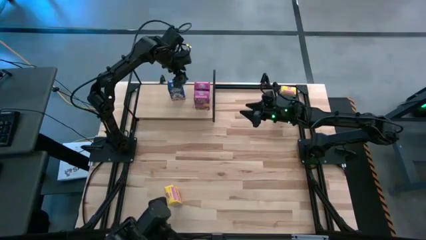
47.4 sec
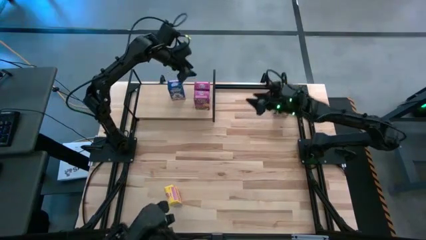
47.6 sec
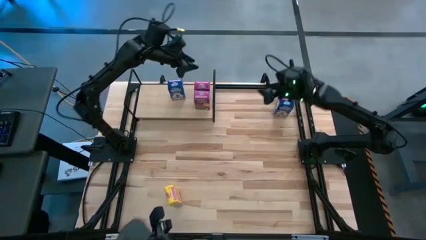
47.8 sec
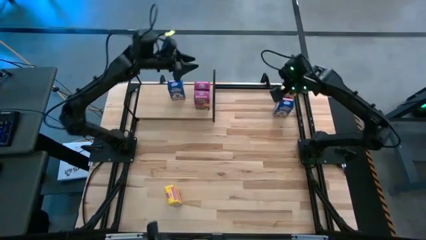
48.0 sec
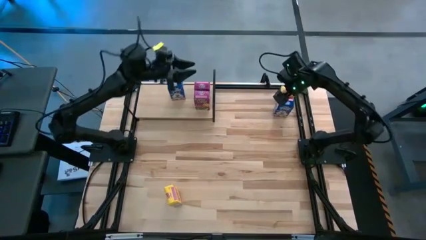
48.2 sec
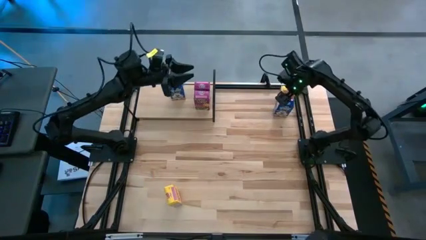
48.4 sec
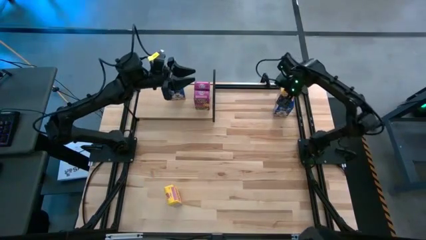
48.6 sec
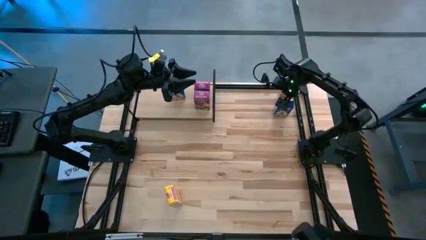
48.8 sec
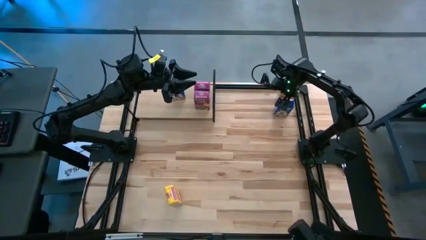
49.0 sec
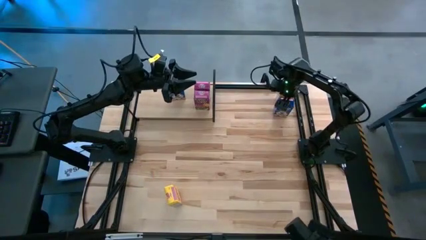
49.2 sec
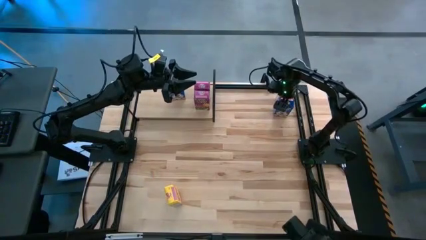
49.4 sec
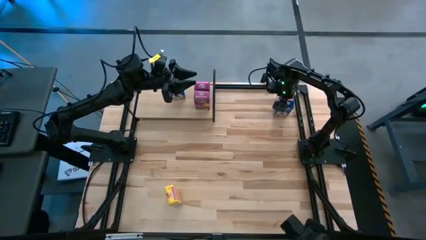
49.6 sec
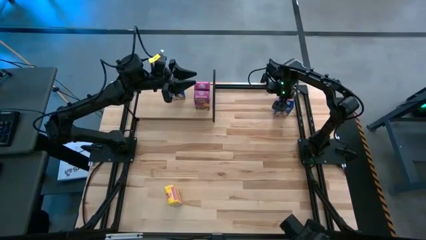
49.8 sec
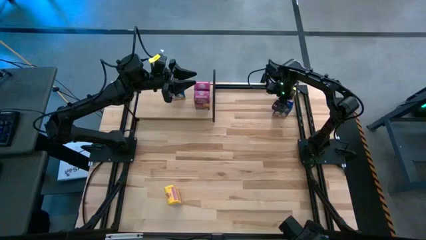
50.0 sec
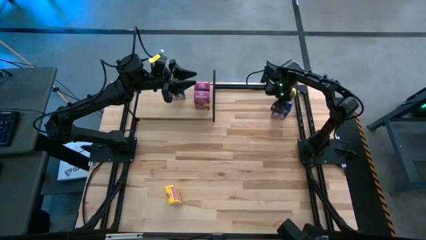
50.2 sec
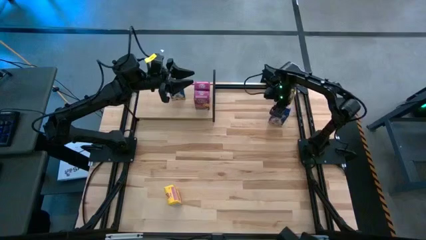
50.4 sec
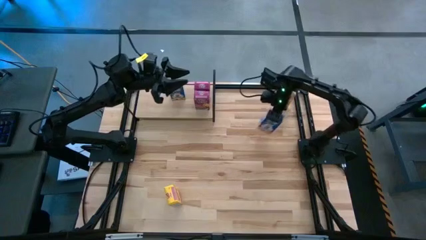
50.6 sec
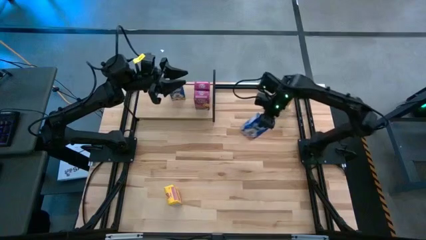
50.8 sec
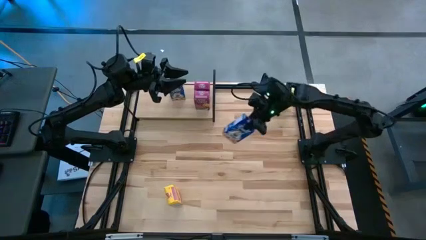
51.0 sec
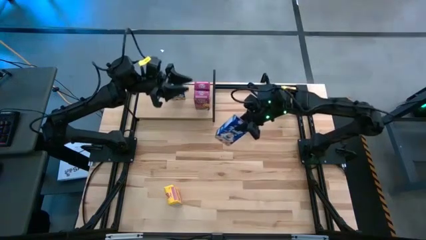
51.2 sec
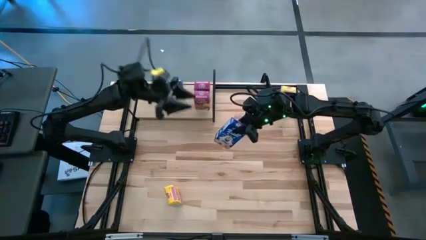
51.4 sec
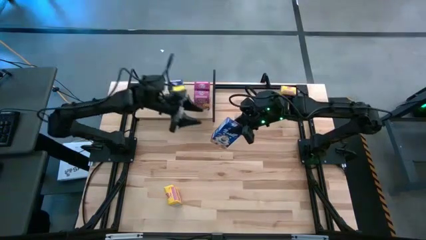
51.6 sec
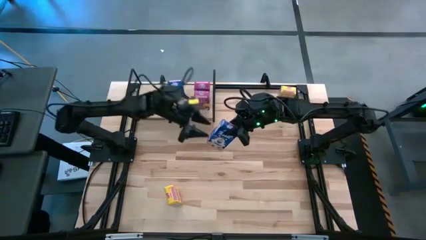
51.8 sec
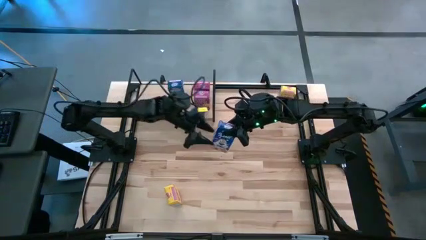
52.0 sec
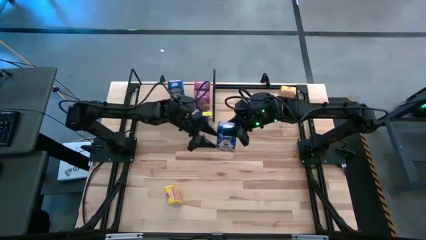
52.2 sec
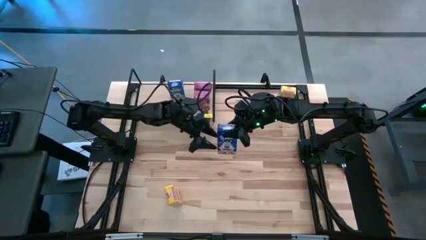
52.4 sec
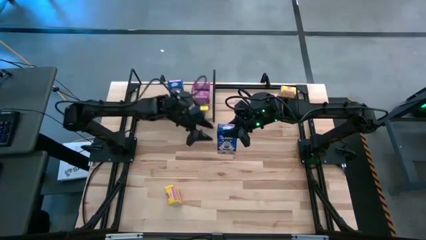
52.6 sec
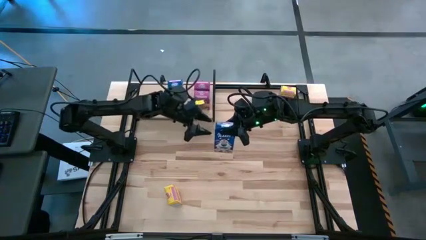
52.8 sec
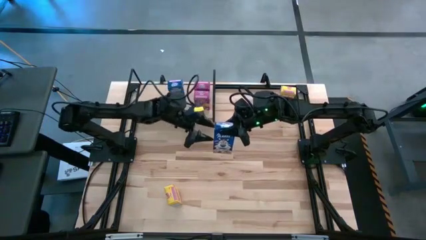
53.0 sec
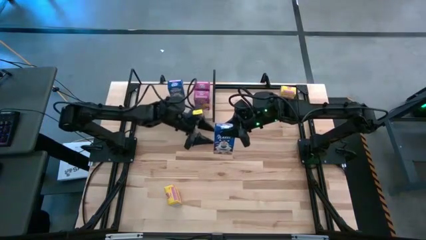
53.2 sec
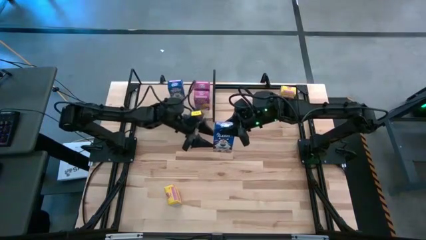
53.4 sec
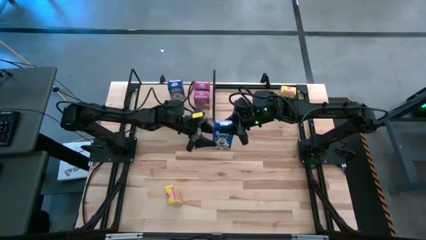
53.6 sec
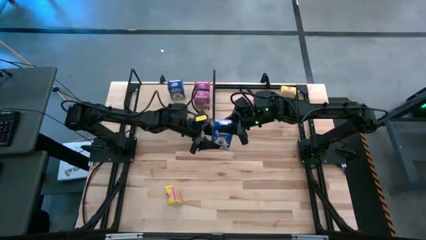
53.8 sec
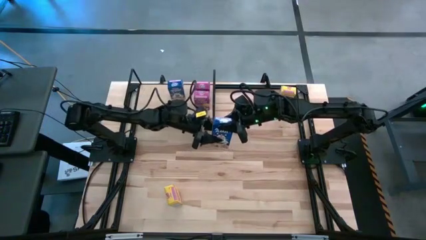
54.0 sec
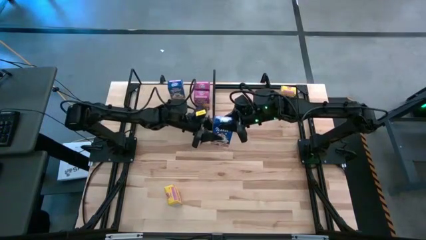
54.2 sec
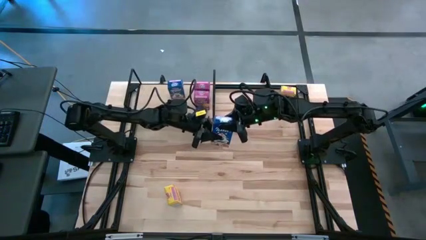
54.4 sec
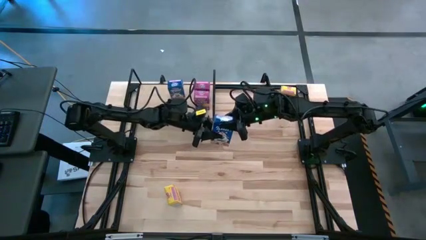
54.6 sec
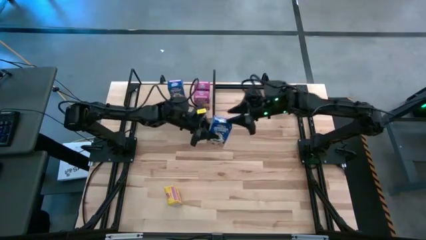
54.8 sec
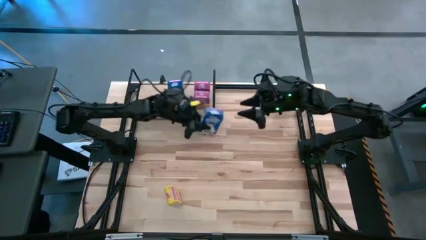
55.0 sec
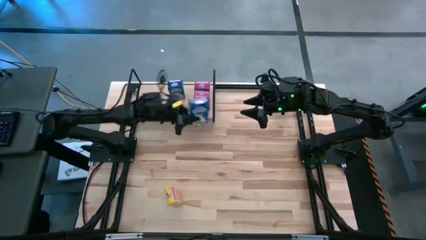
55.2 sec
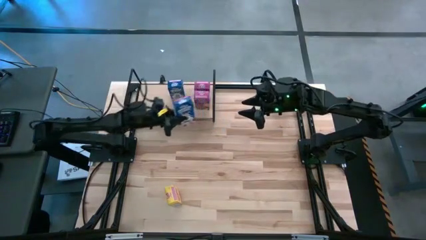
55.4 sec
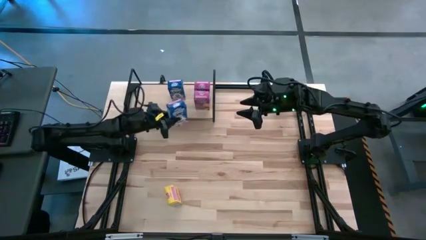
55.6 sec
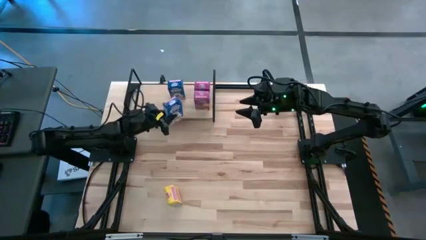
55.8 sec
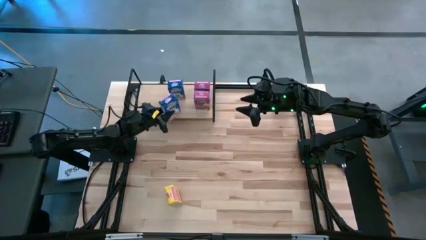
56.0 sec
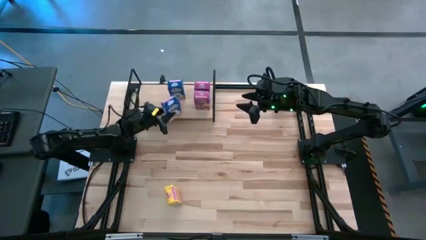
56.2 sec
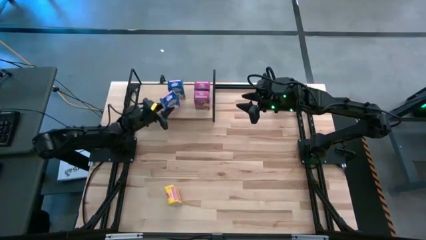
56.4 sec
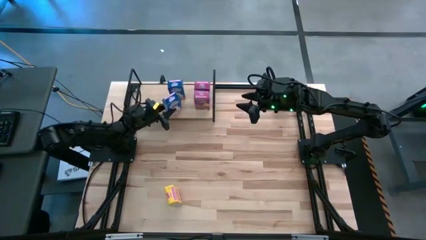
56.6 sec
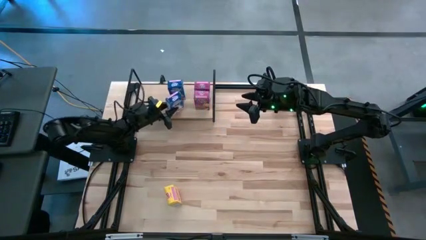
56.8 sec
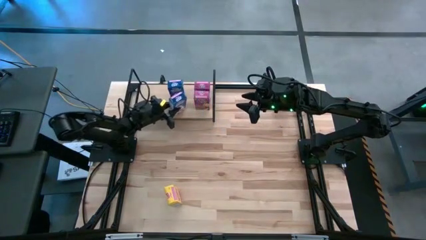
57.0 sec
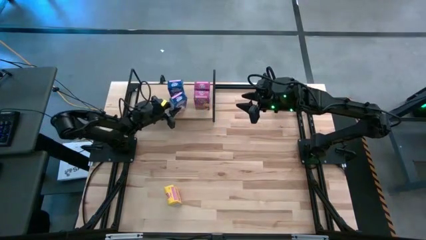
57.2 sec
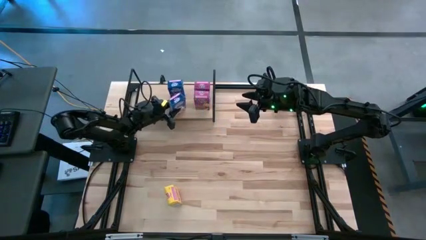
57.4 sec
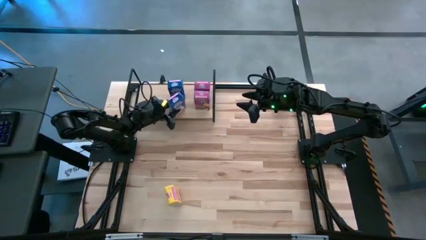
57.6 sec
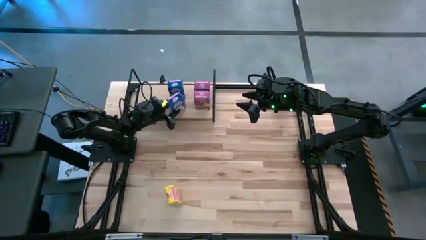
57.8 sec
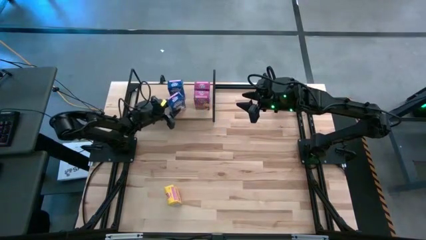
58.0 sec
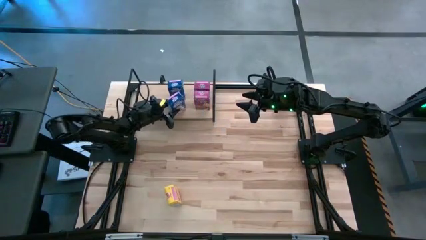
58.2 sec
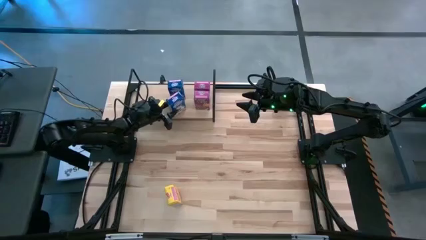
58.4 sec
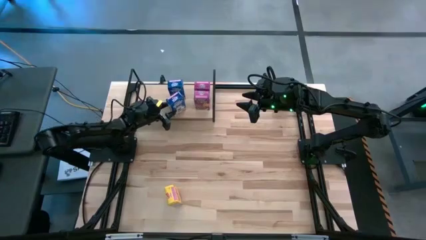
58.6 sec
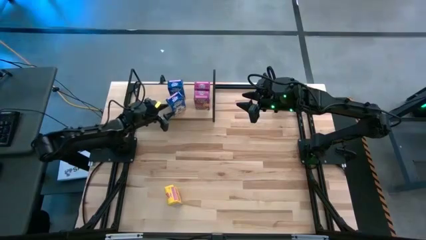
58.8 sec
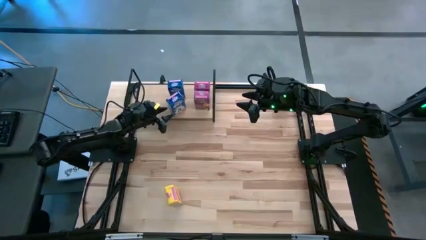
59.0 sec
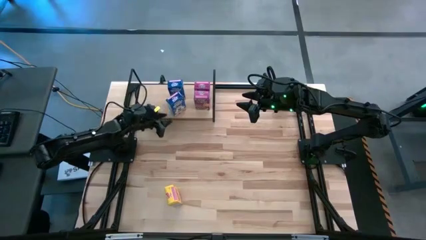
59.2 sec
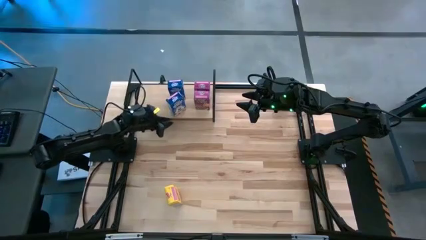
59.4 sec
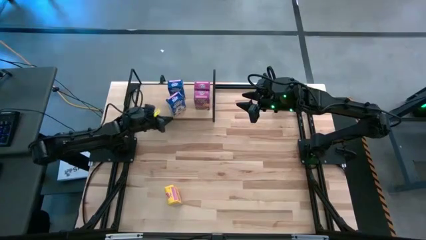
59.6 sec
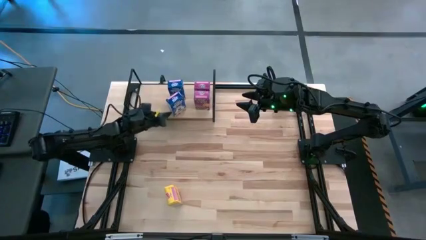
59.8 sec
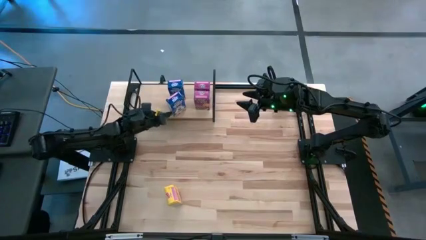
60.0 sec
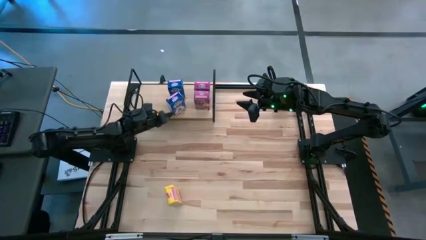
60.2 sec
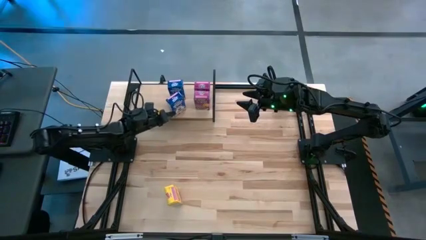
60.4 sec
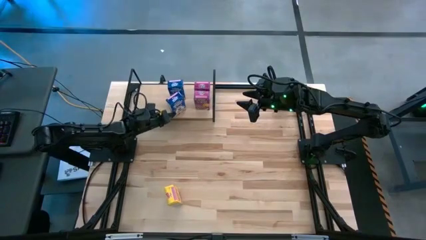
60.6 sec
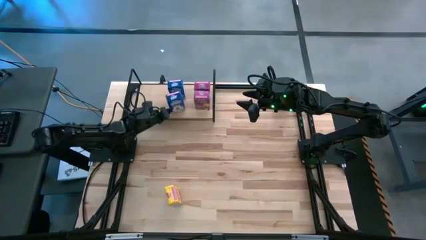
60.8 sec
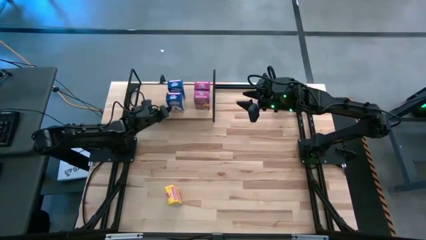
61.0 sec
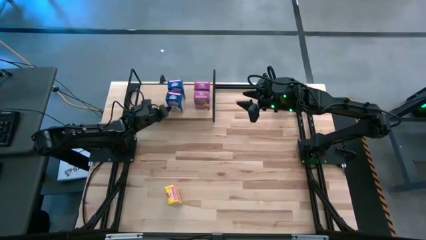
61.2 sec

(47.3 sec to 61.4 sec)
Task: Stack cereal on shelf
Align the blue cereal box on the shelf

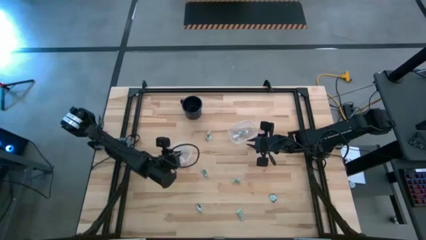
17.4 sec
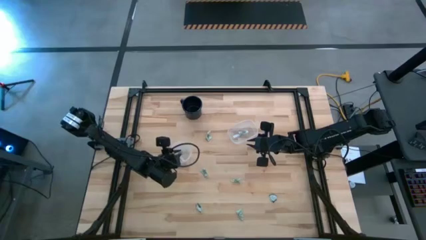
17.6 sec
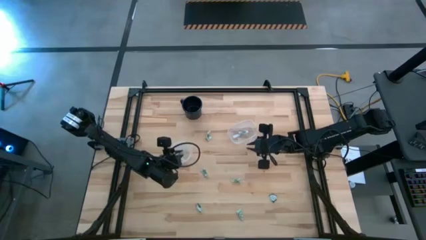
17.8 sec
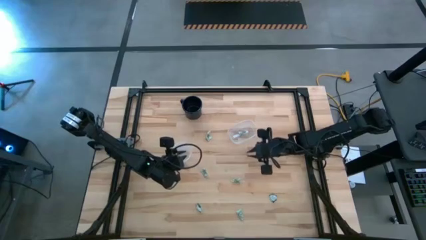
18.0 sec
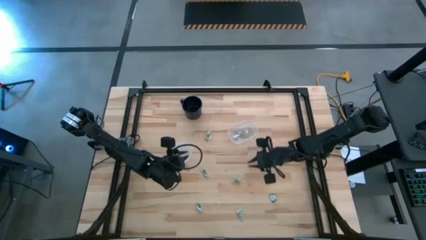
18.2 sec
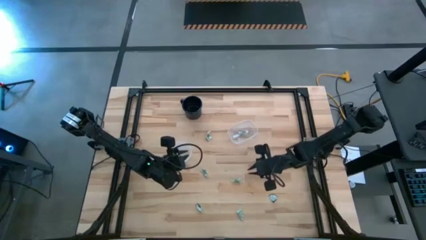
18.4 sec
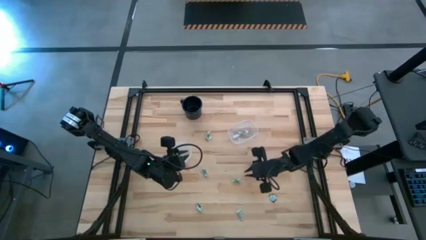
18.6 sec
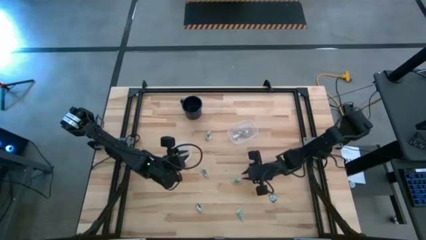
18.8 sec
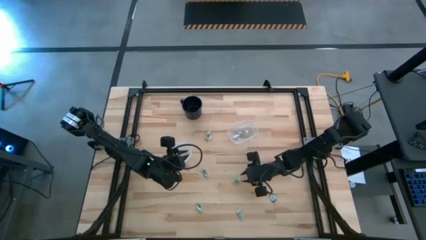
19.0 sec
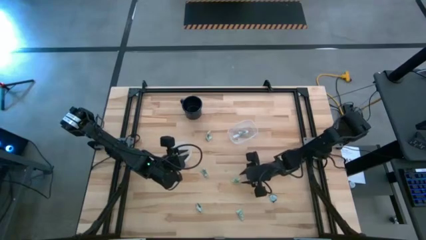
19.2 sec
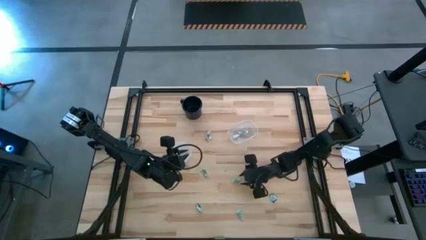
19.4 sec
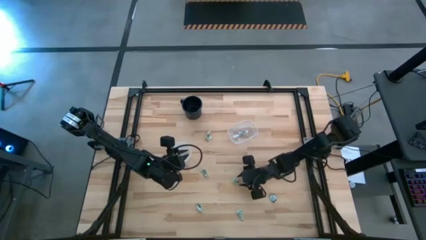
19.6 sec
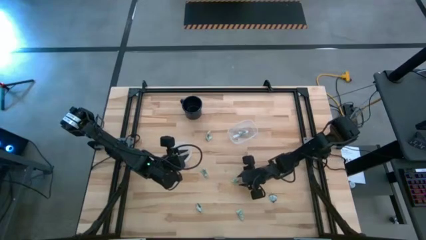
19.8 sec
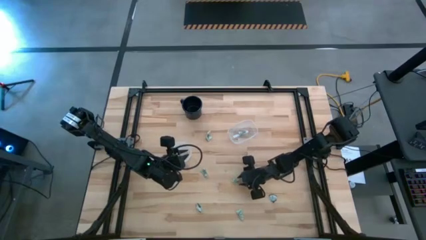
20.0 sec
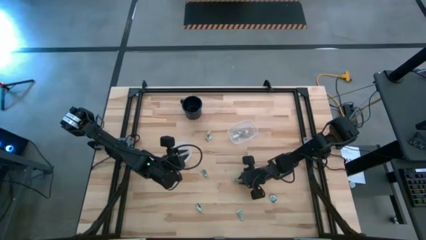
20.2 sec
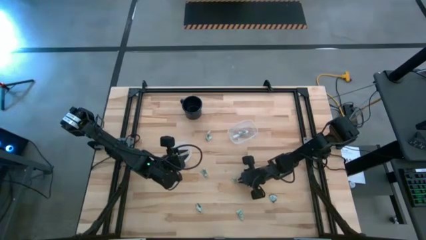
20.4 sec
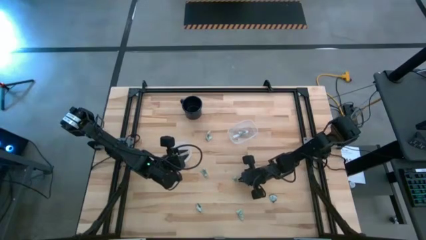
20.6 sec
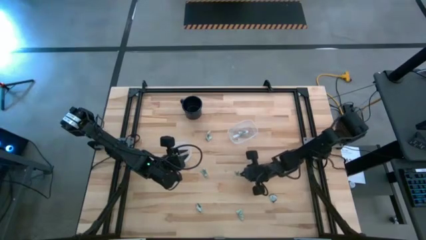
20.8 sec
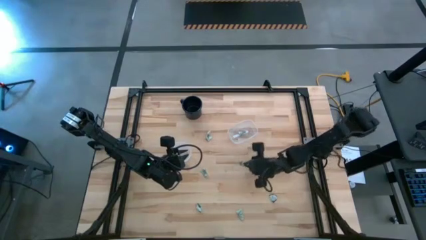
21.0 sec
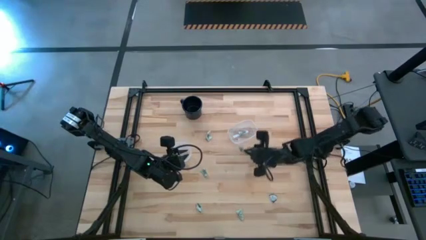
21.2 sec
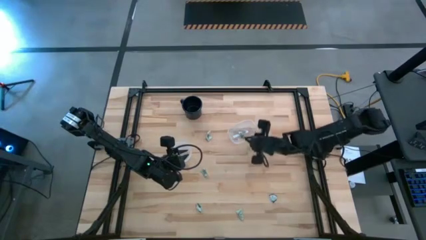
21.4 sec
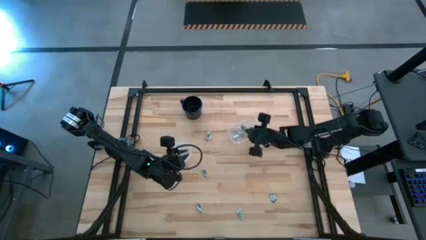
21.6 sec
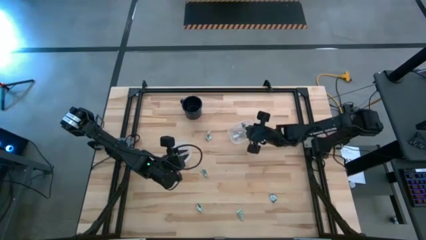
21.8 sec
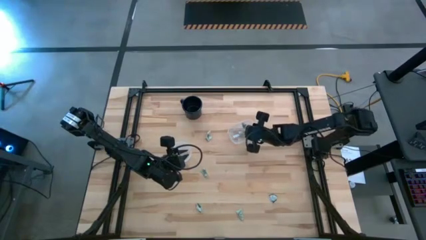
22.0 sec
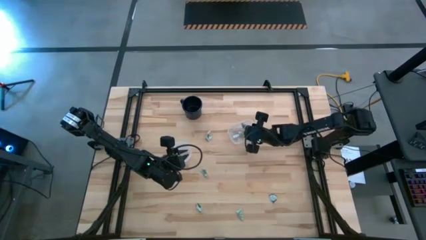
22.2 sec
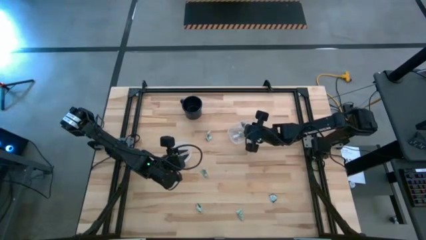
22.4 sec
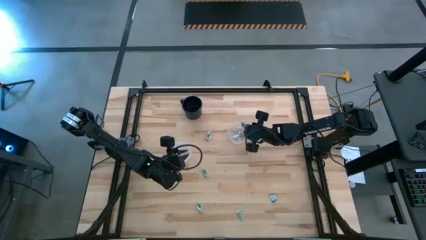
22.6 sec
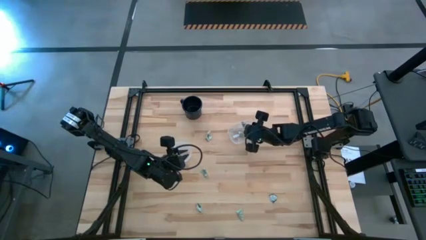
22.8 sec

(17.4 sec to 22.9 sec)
Task: Pick and place items into bin
Put the stevia packet into the rectangle transparent bin
